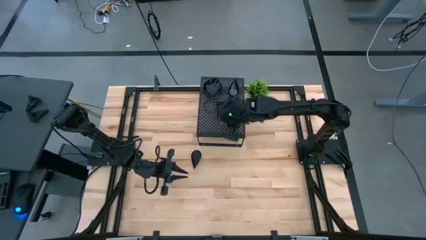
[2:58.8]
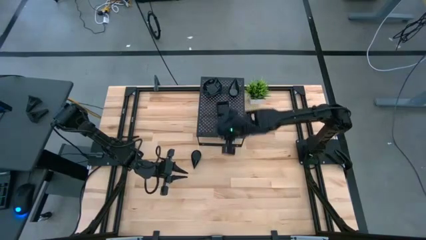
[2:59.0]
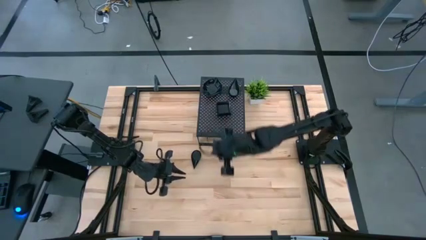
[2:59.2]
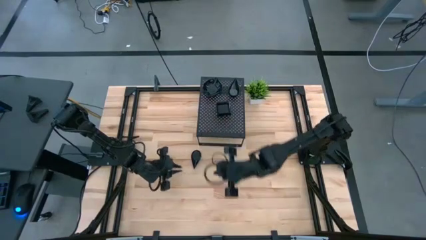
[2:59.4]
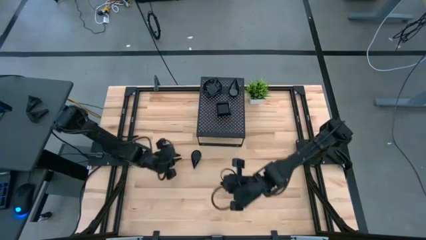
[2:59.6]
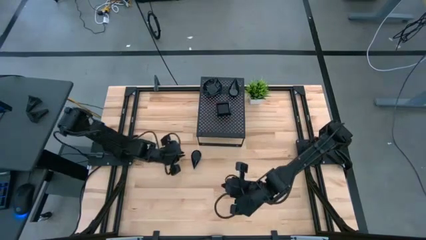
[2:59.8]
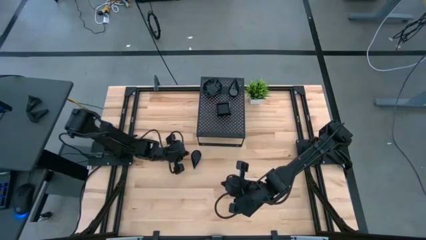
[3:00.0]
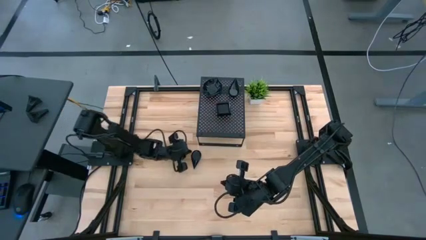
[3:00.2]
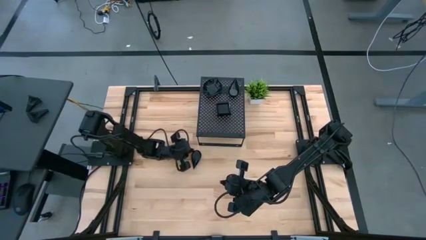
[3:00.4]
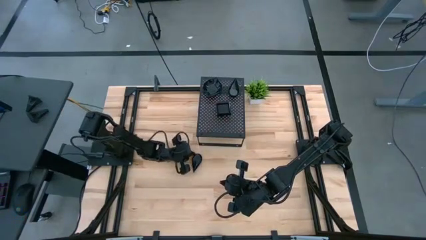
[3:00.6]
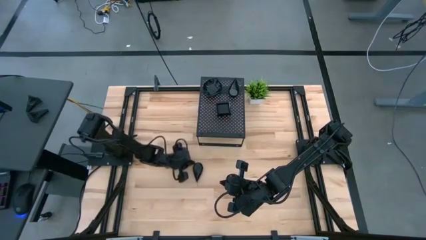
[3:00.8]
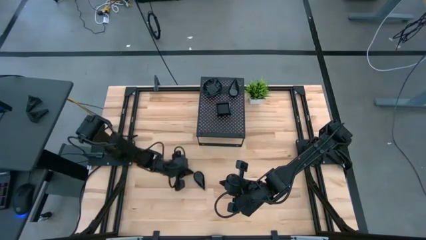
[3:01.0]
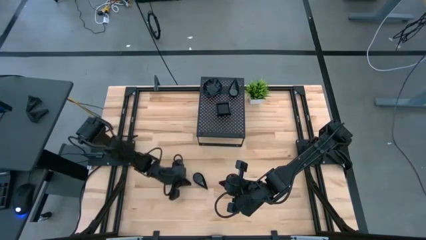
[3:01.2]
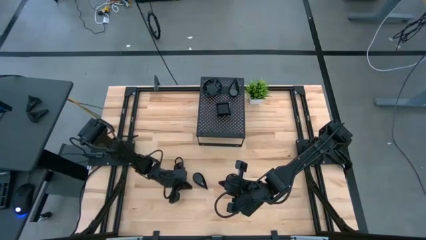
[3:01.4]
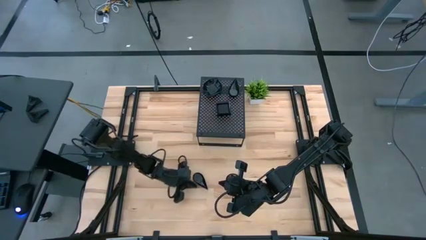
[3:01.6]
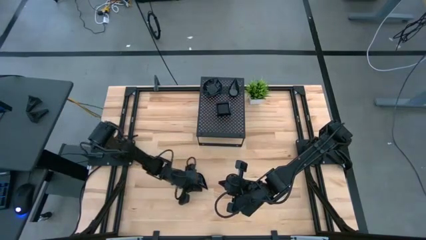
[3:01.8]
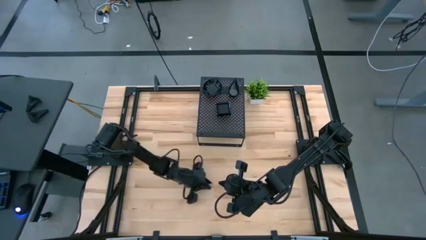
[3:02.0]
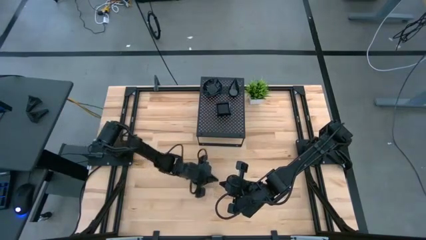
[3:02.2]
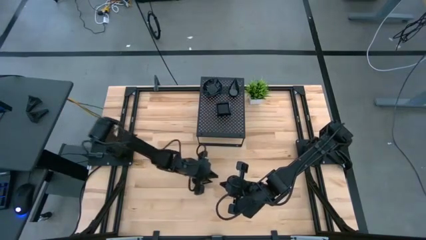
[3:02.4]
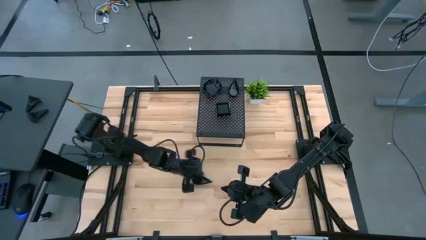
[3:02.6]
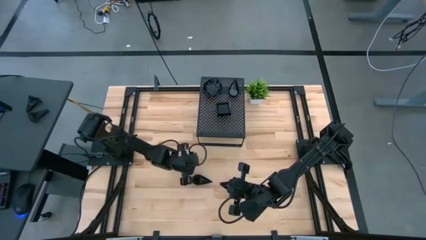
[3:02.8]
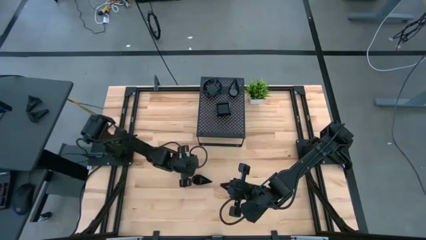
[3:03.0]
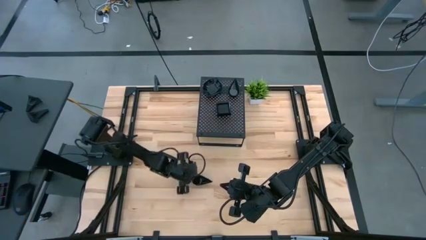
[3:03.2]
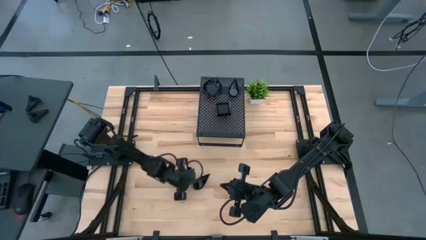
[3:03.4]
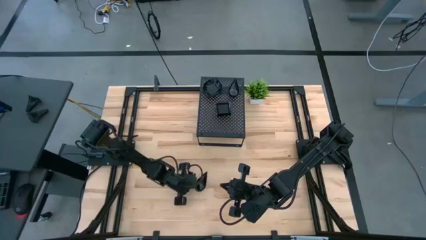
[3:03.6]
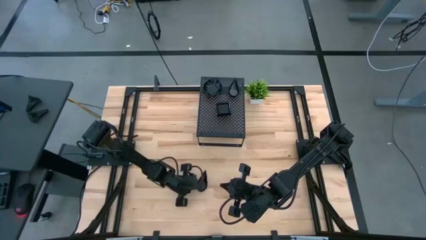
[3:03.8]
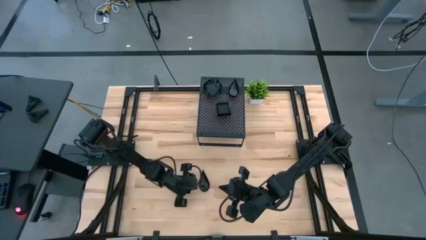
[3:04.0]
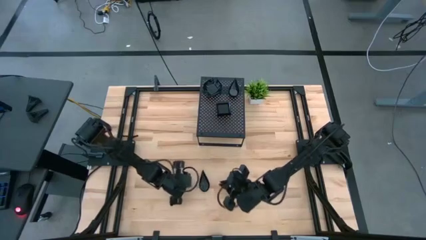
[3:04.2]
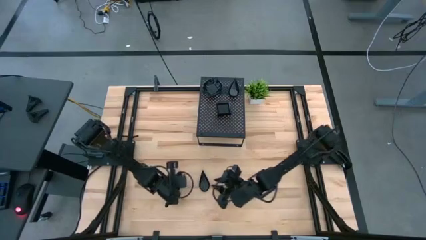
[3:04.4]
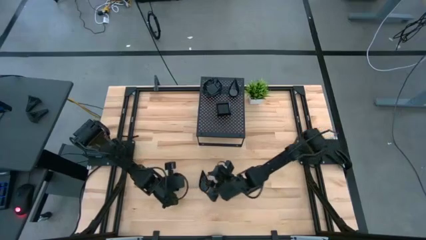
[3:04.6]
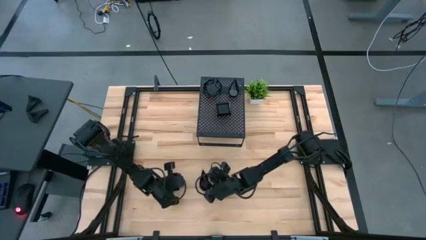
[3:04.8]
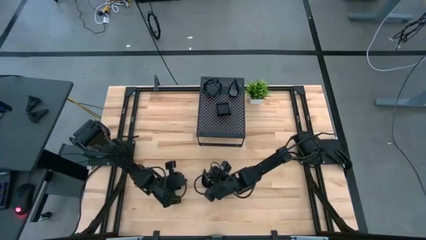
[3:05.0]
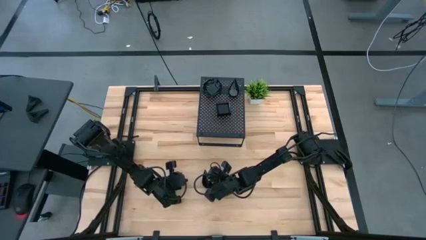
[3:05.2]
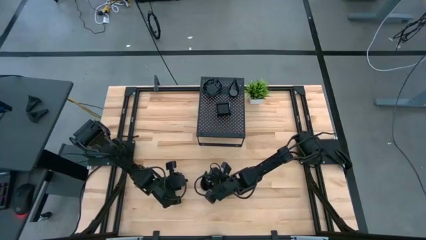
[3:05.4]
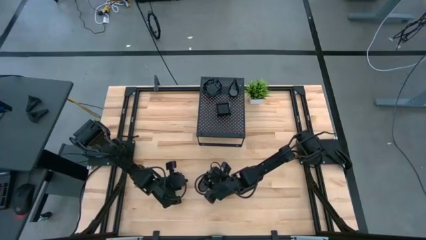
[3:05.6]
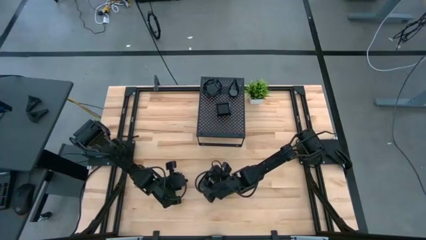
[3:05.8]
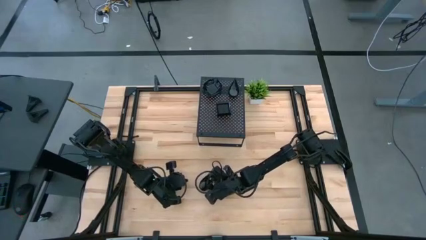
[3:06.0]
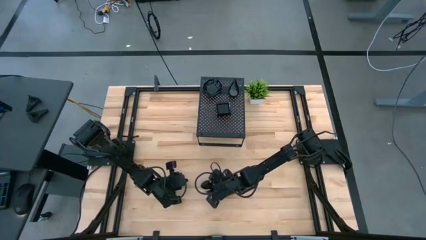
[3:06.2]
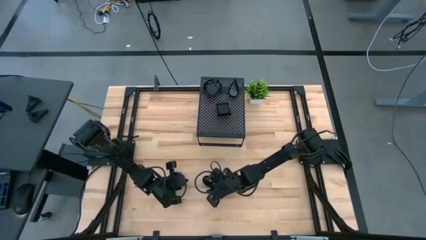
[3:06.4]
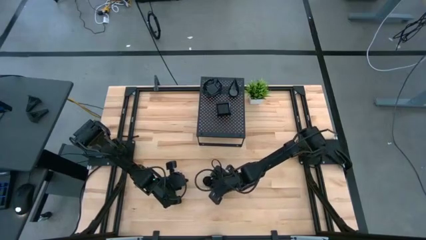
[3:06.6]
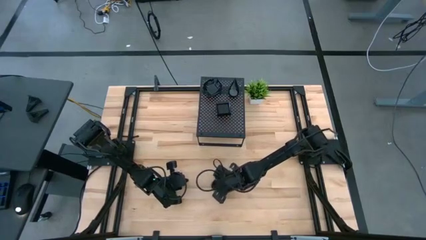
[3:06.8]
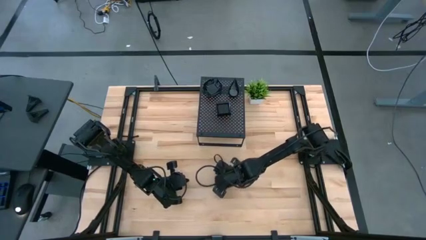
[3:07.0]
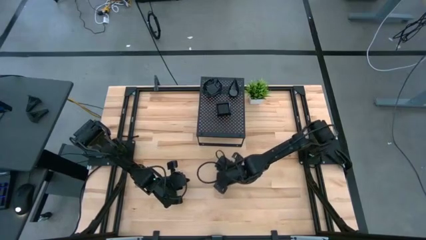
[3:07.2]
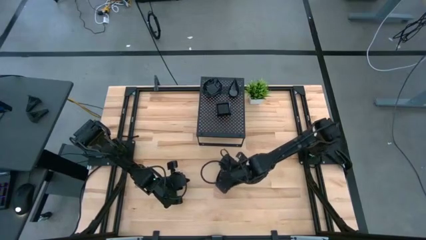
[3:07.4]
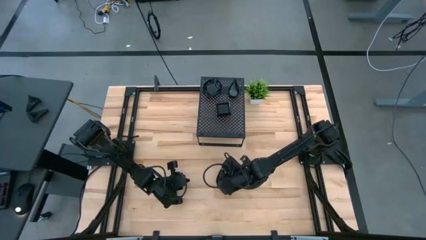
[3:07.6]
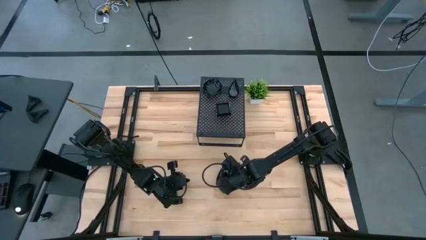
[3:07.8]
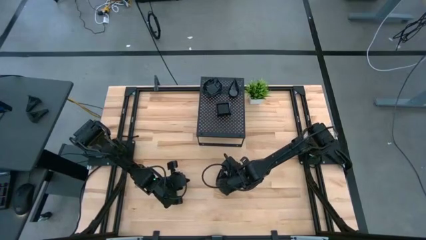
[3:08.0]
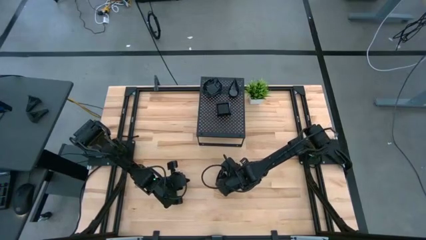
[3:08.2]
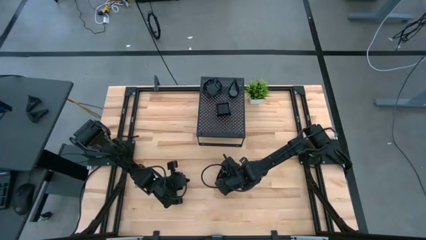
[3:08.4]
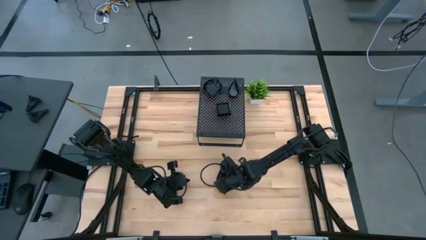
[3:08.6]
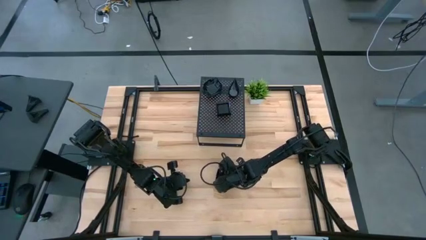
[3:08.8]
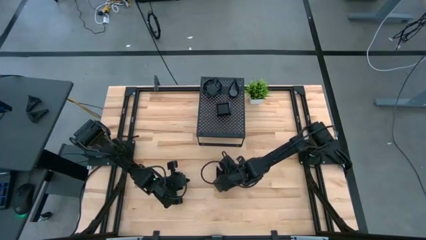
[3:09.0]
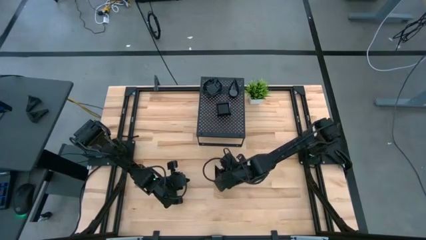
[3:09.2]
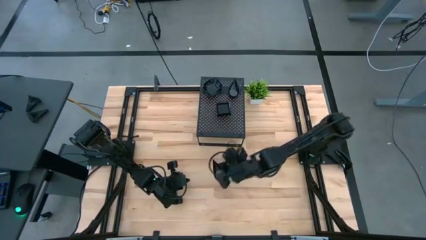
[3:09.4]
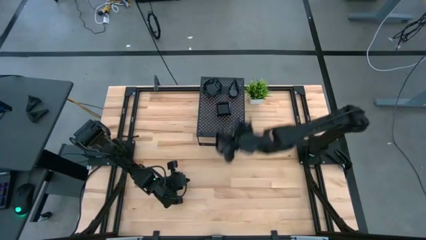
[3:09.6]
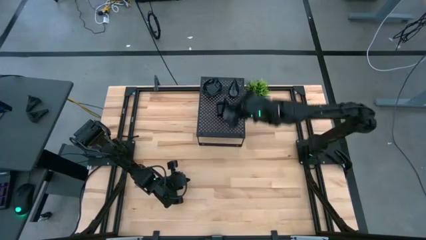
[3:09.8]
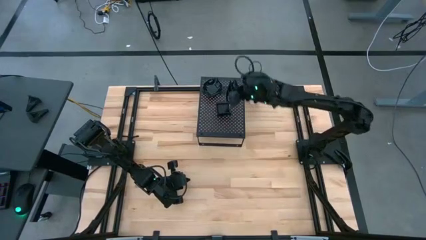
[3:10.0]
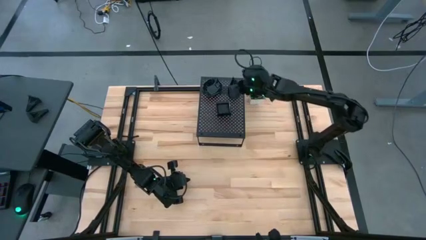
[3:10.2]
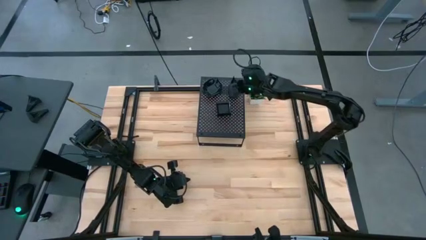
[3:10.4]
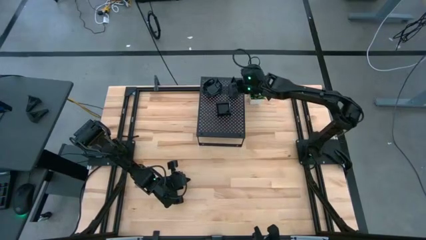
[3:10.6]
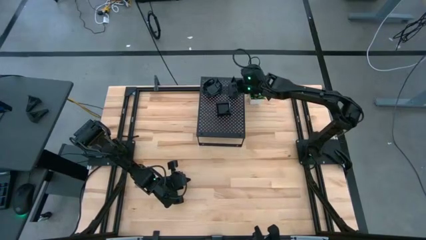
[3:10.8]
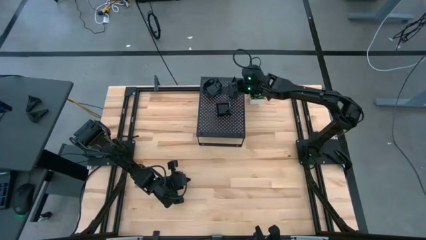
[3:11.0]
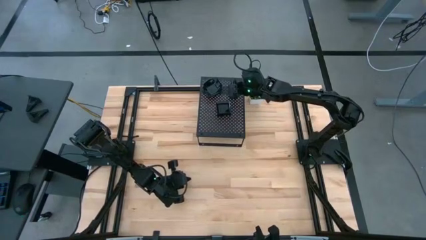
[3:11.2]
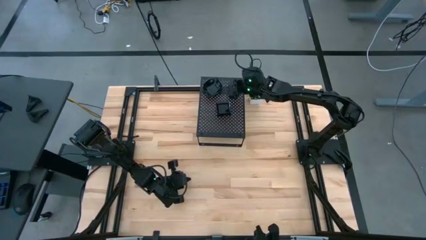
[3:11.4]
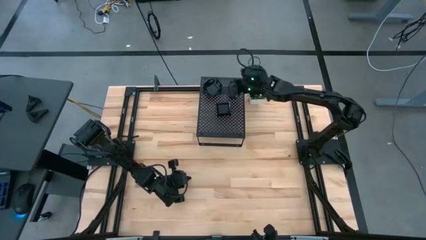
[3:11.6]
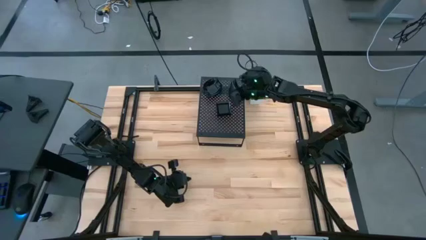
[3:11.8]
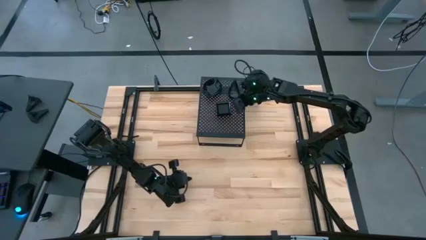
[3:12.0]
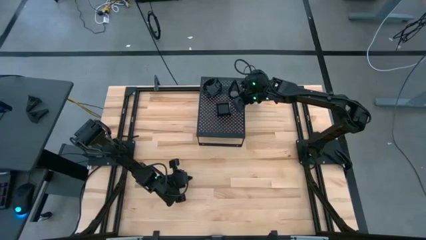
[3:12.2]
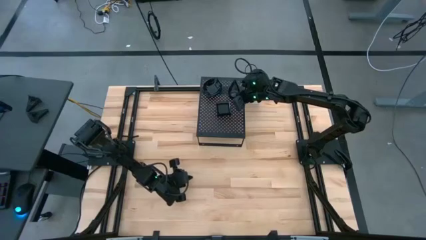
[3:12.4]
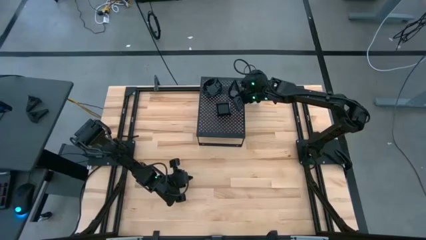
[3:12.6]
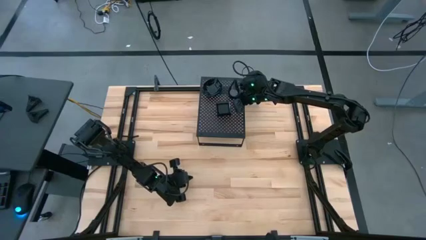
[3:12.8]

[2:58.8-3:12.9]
Task: Pick & Place Mini shaped plates
Stack the black drop-shaped plate on top of the black drop-shaped plates on the shelf
